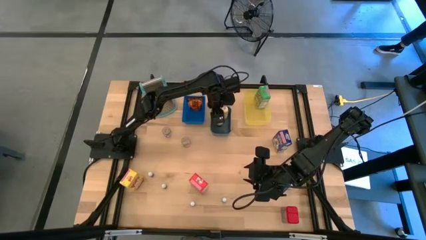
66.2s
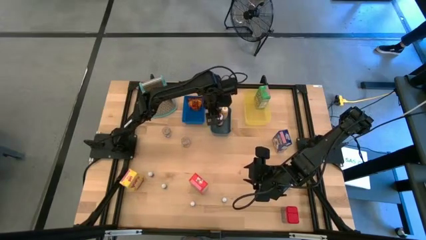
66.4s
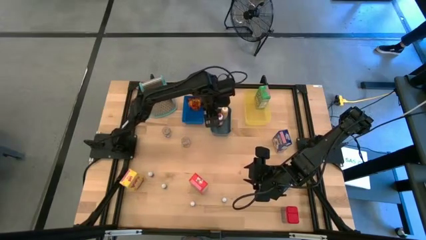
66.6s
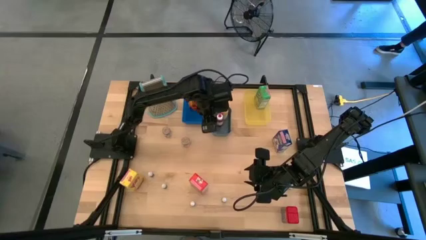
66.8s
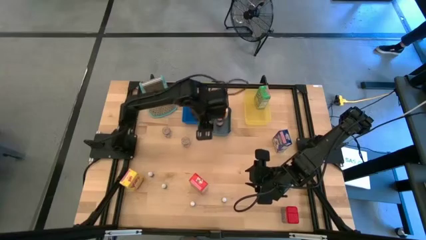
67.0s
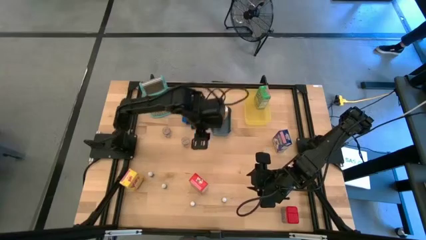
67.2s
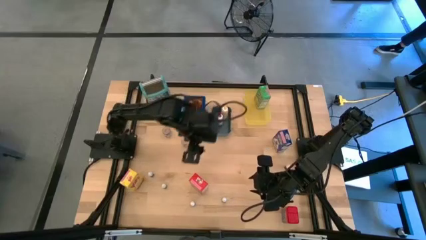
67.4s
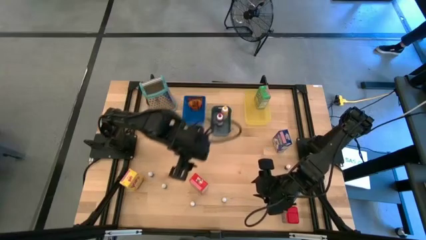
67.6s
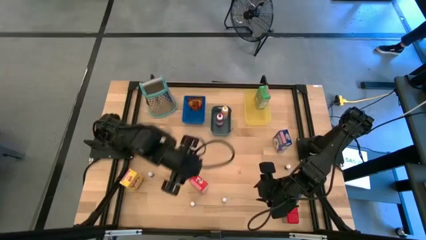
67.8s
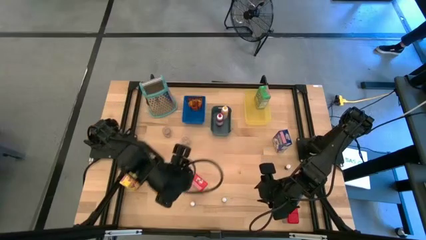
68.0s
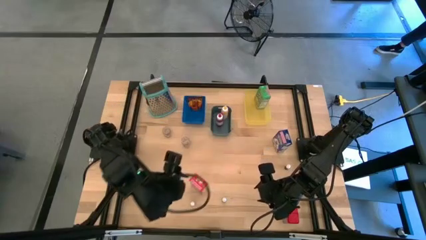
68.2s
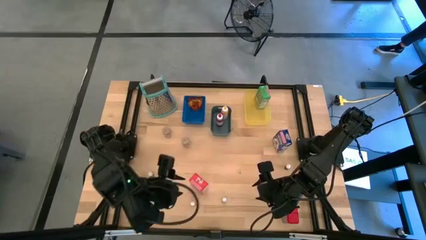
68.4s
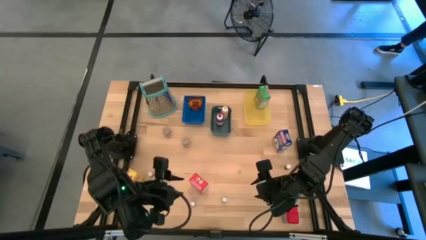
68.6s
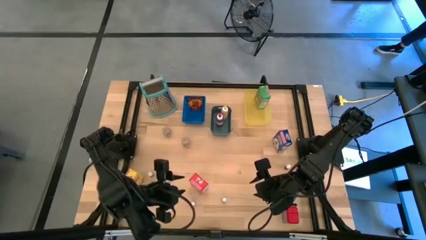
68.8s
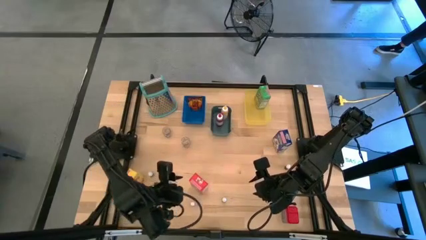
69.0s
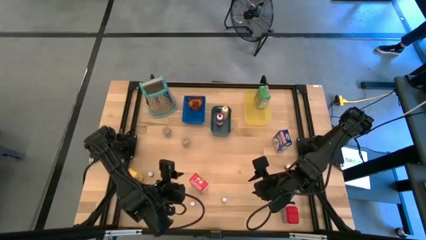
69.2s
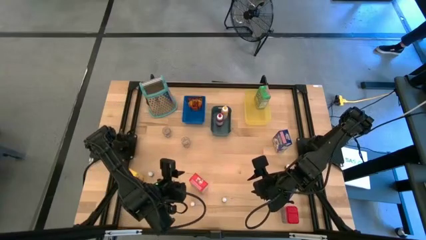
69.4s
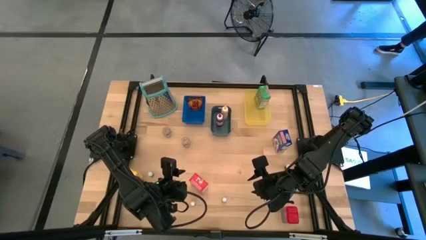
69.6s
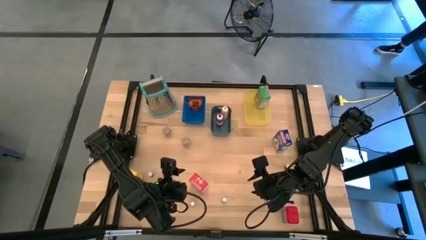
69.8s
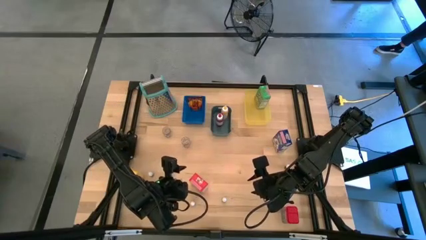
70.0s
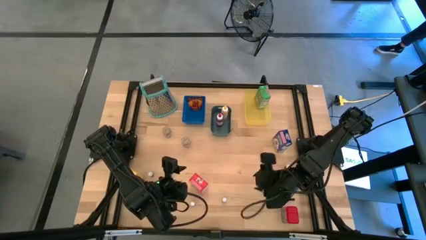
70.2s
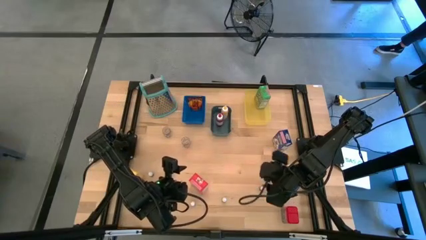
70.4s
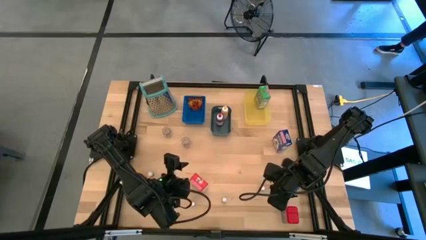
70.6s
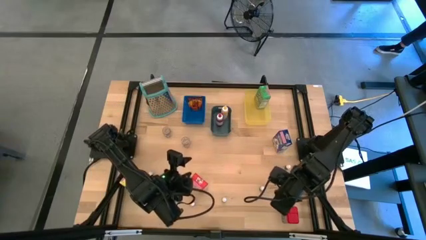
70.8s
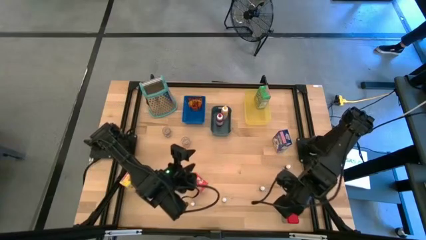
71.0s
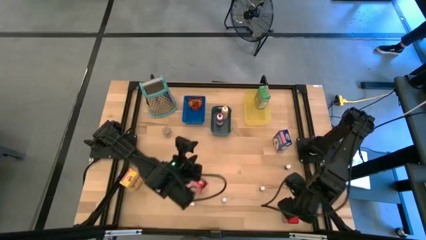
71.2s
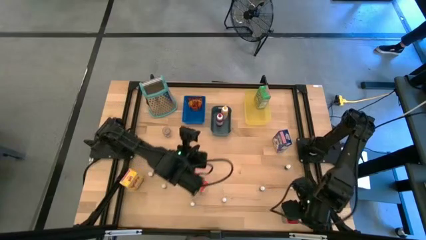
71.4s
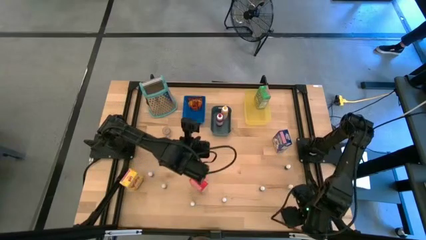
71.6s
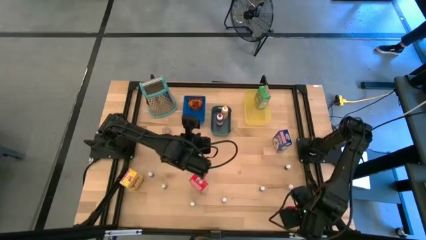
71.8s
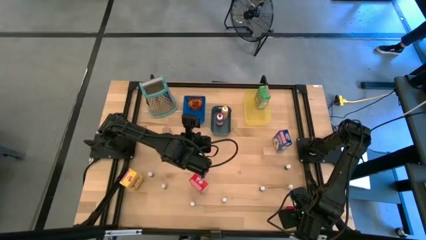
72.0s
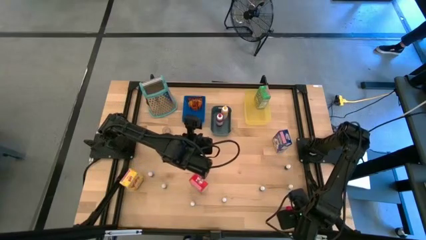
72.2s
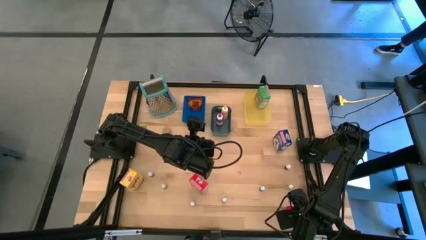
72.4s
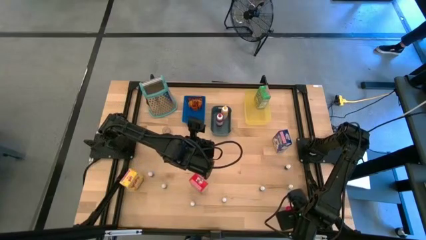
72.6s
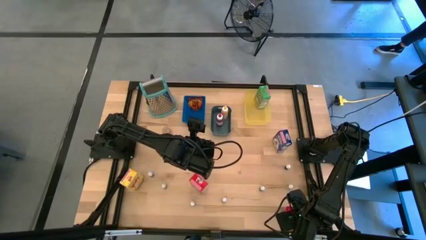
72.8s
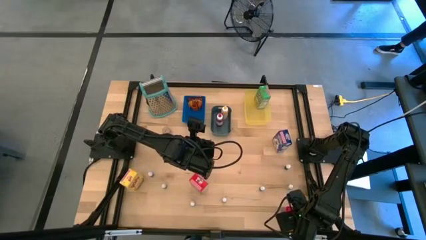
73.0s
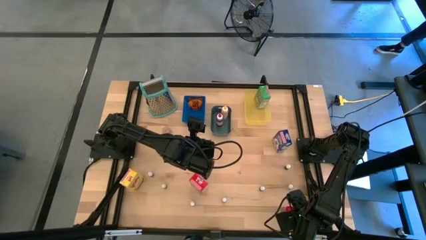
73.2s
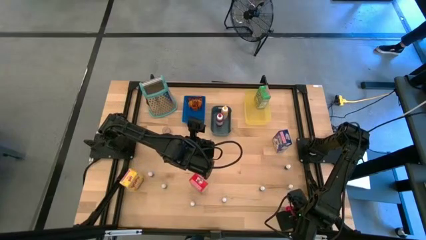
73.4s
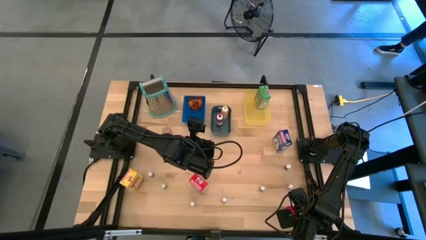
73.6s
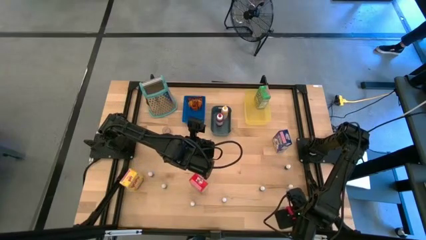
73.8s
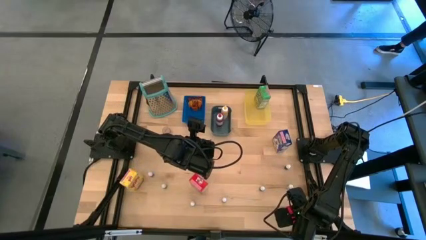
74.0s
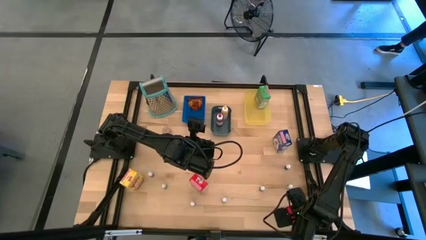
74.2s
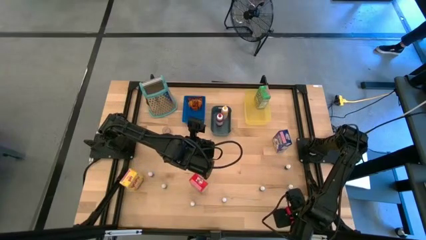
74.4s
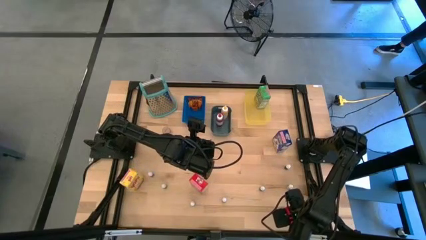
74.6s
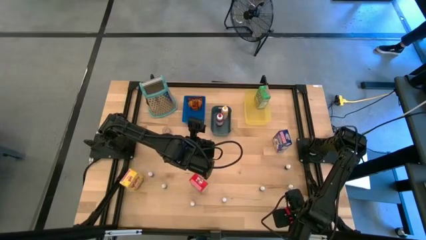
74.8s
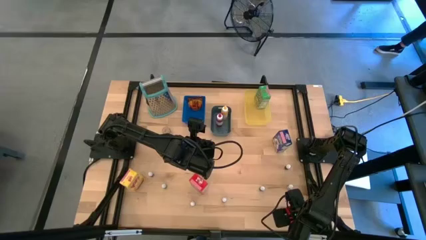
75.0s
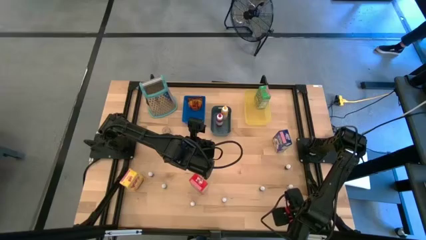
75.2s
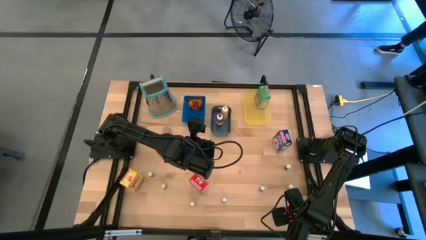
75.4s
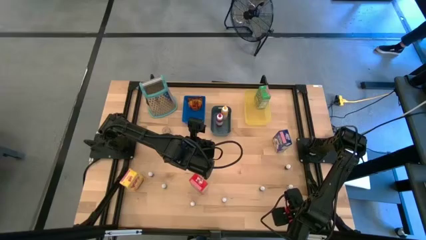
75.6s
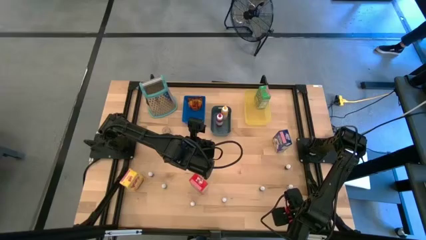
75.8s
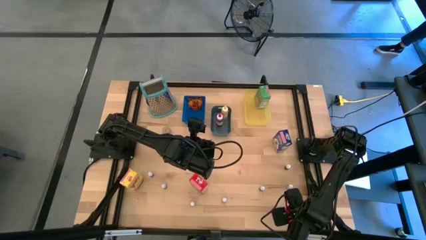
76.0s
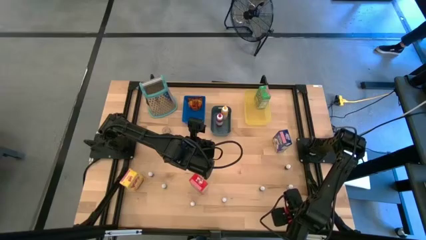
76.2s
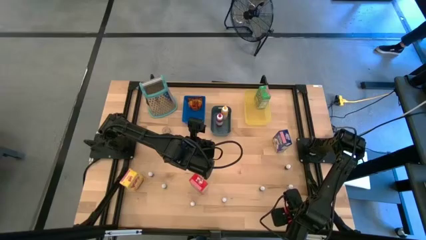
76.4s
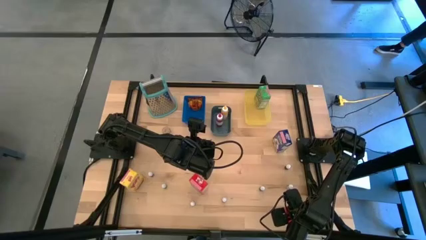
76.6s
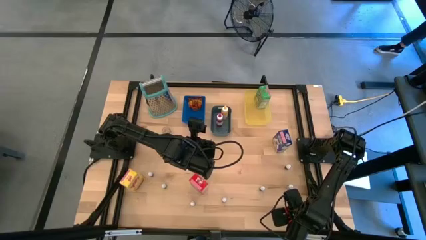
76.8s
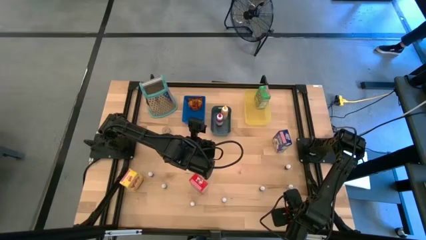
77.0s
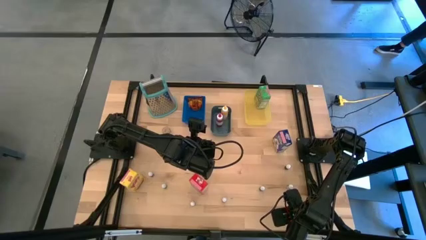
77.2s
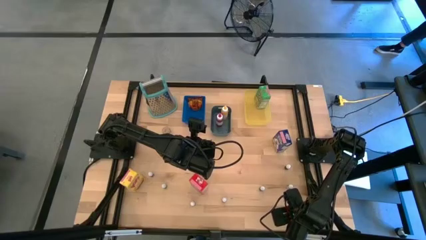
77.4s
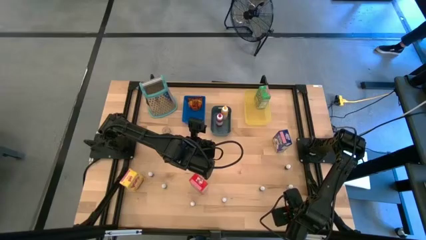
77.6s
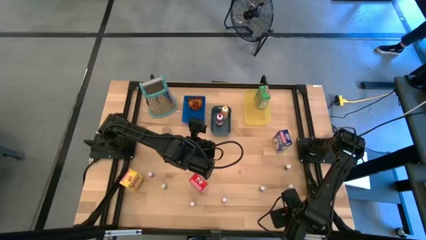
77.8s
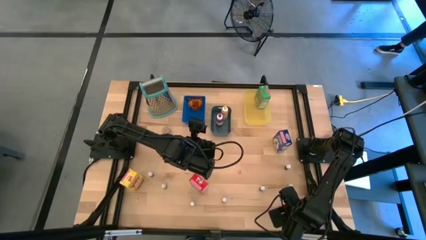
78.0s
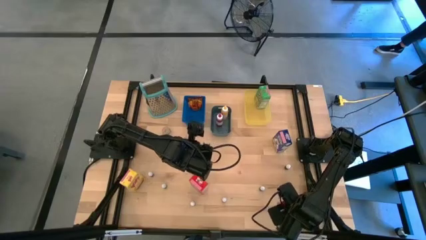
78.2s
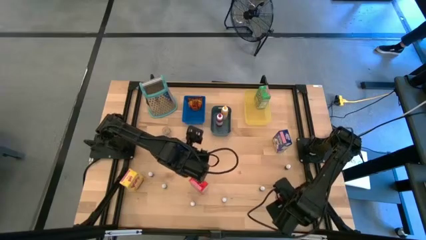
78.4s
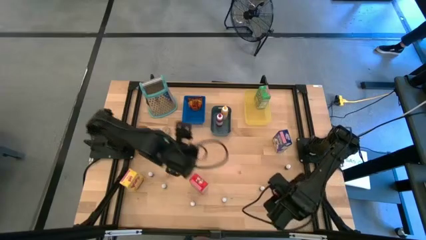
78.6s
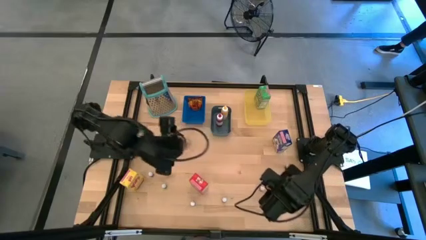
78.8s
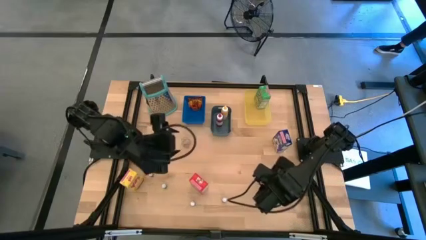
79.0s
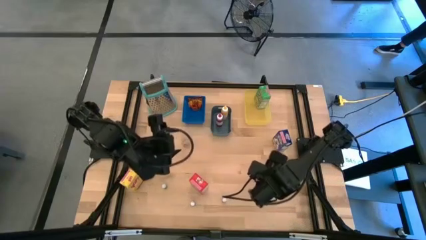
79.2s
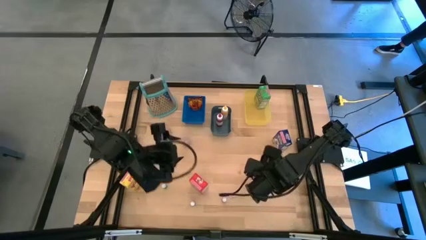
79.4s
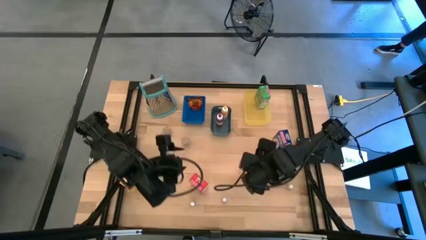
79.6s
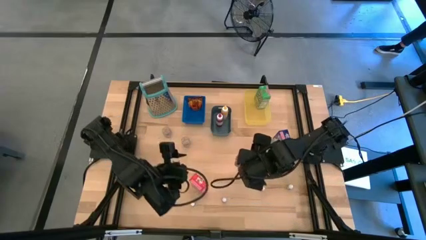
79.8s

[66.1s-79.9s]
Task: Pick & Place Kitchen Items
Put the red seasoning can into the blue bin

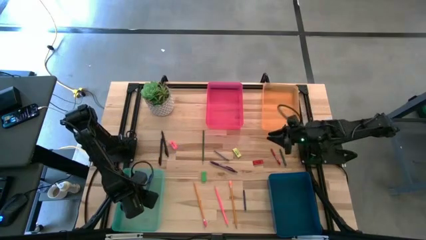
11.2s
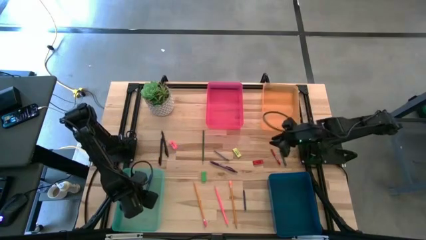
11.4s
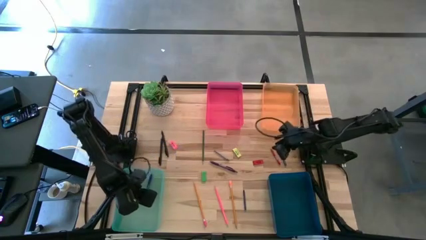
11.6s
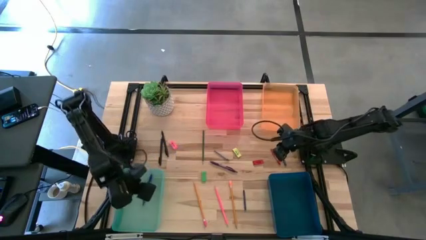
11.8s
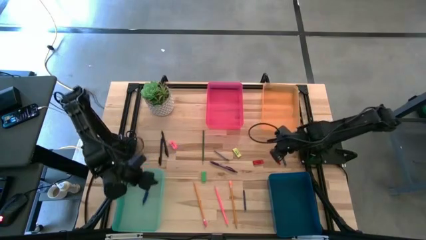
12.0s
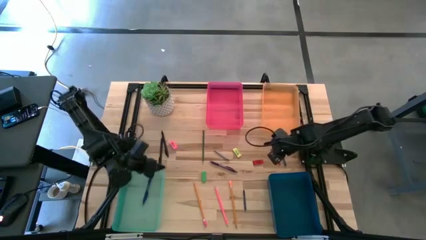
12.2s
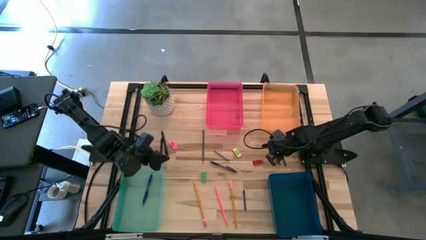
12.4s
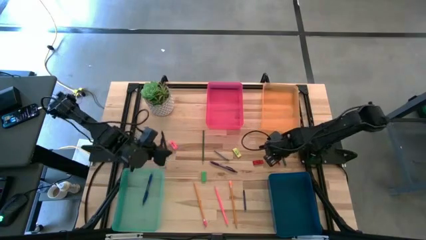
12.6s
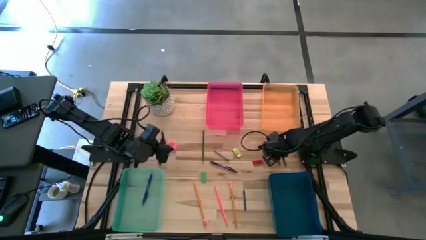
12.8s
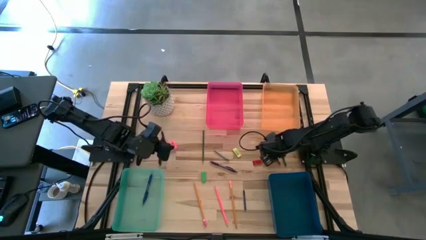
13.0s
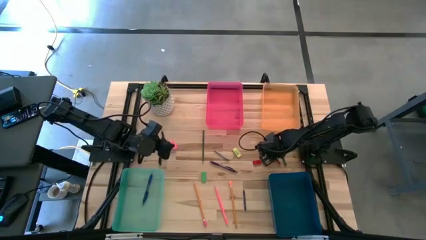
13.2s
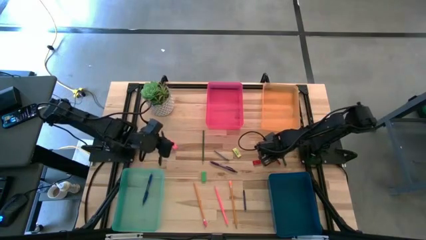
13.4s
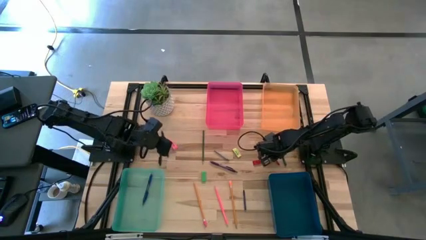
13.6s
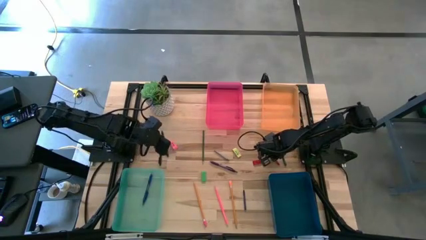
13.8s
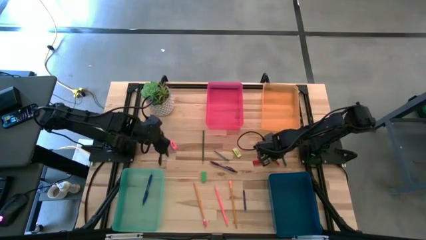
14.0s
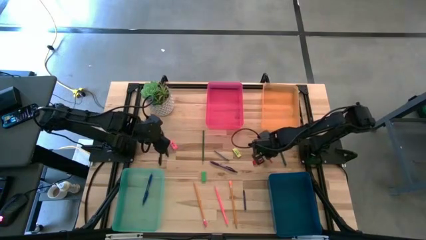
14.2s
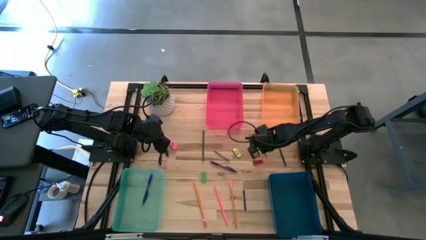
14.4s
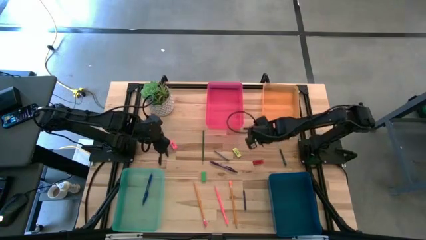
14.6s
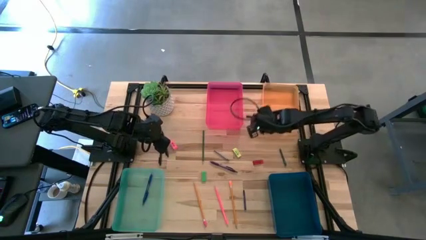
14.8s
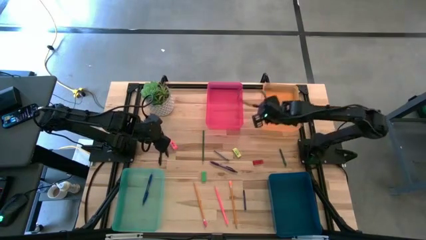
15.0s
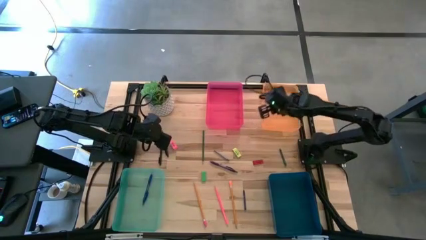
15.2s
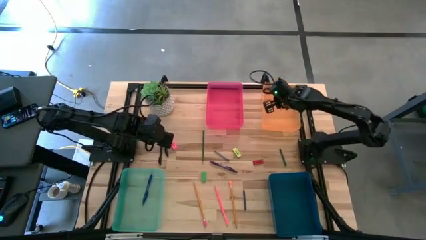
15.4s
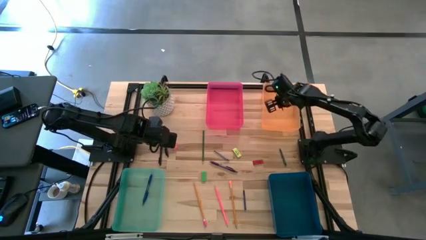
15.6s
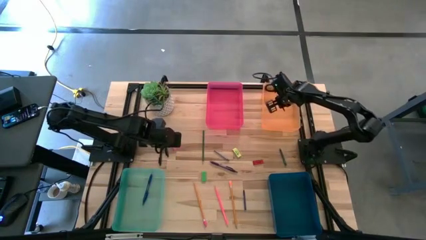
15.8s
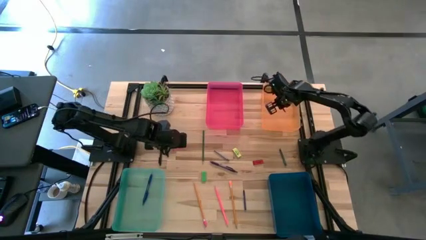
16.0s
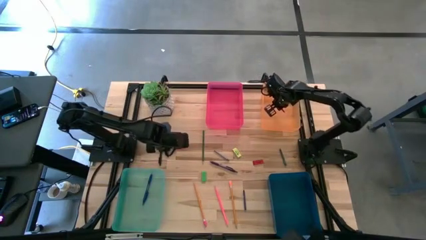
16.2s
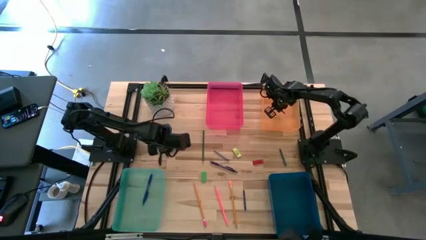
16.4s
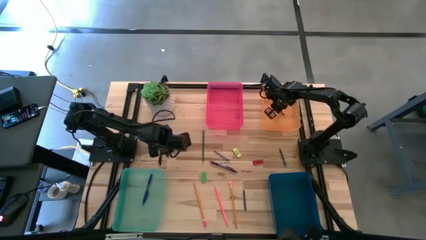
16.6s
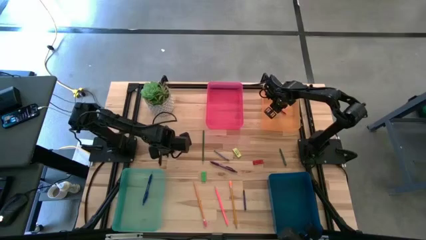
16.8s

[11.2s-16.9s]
Task: Sort crayons/erasers/pens/pencils in bins
Put the red crayon into the orange bin
